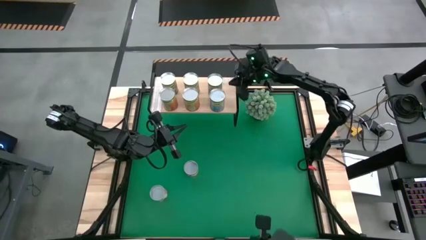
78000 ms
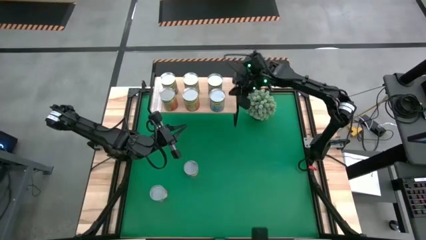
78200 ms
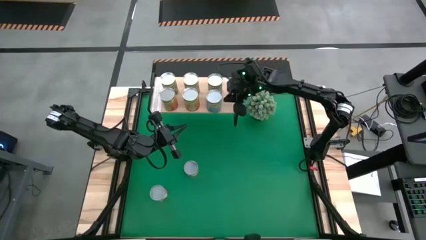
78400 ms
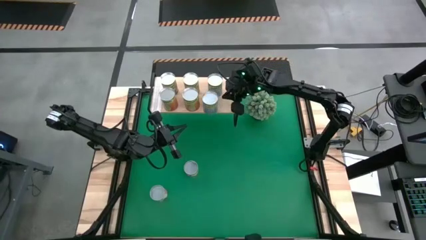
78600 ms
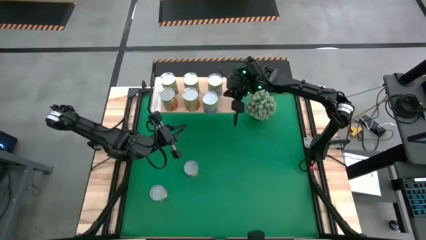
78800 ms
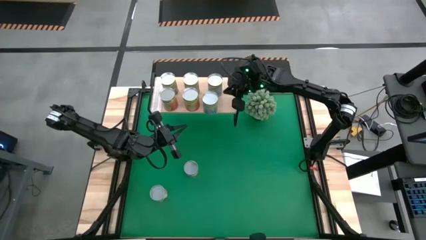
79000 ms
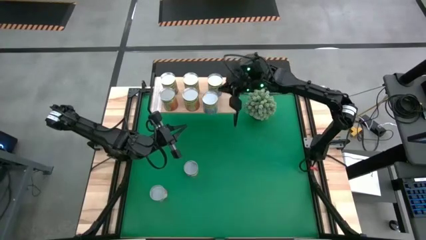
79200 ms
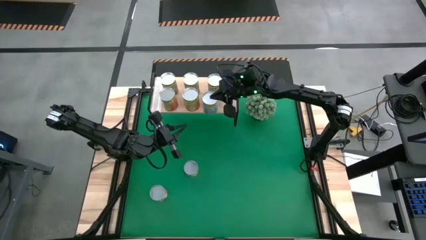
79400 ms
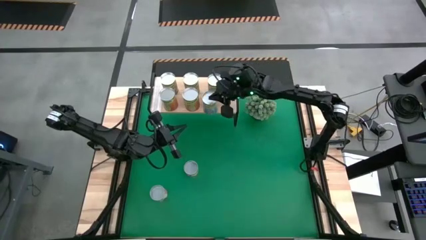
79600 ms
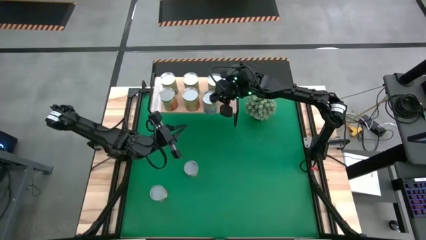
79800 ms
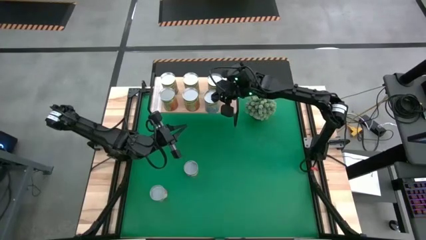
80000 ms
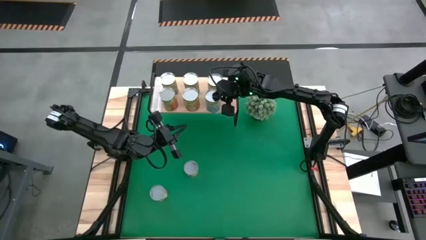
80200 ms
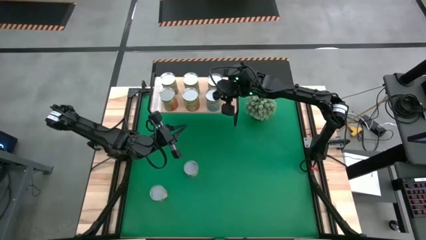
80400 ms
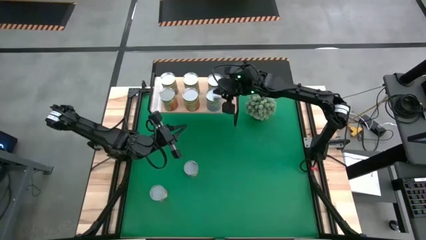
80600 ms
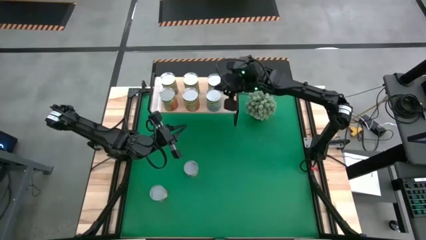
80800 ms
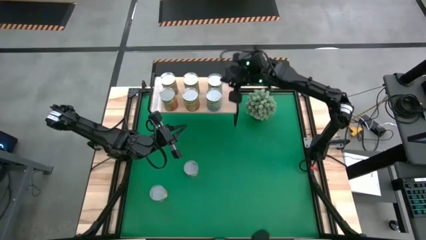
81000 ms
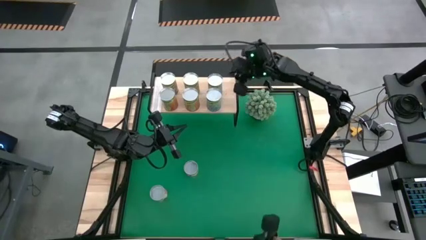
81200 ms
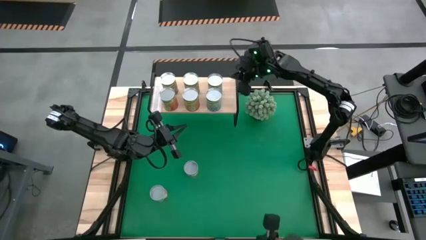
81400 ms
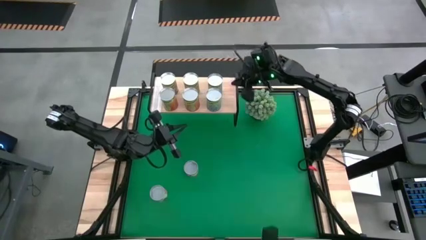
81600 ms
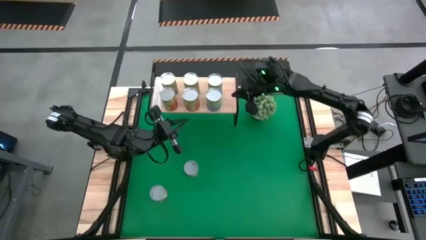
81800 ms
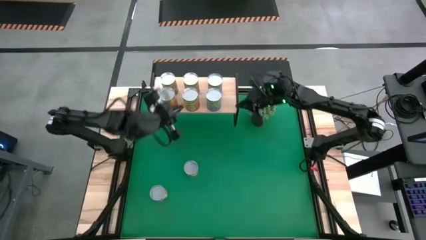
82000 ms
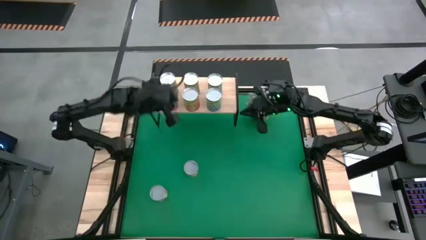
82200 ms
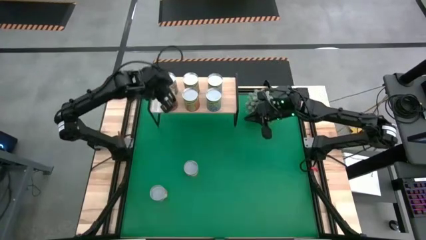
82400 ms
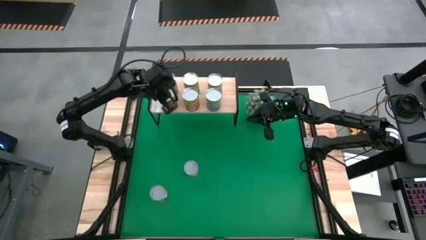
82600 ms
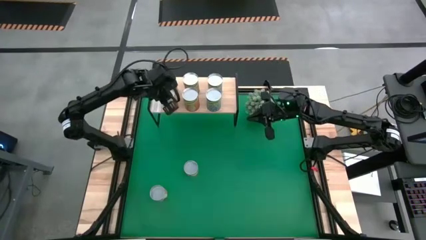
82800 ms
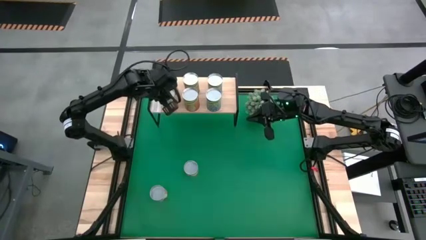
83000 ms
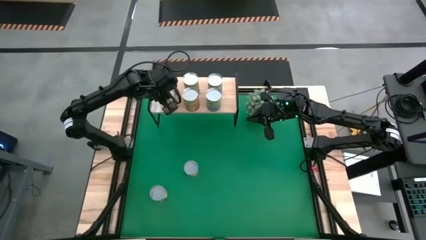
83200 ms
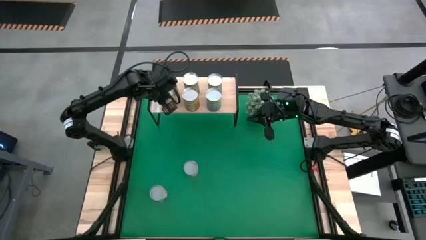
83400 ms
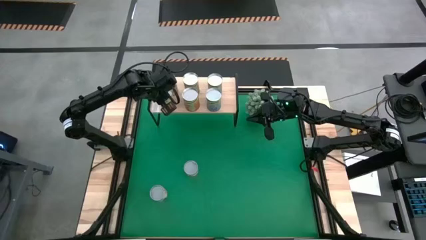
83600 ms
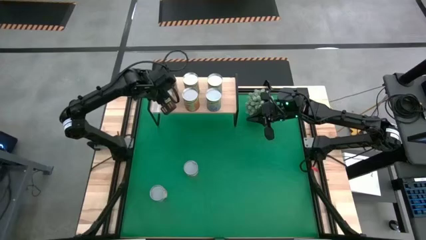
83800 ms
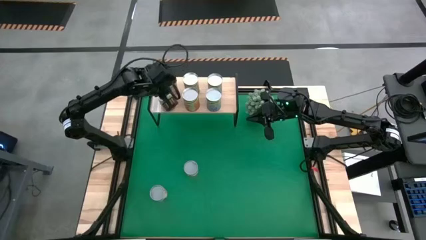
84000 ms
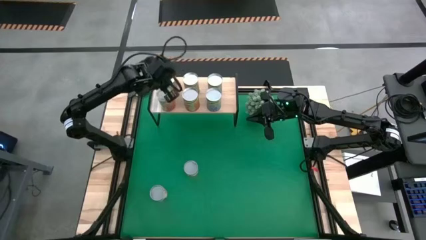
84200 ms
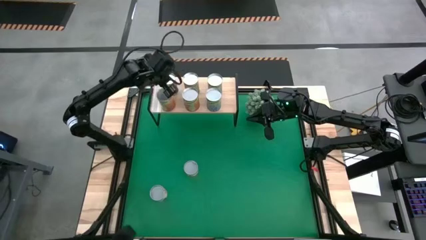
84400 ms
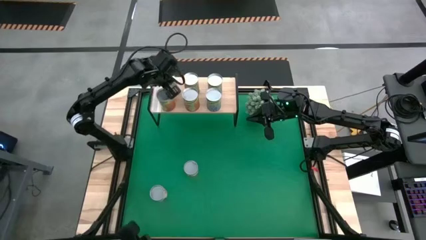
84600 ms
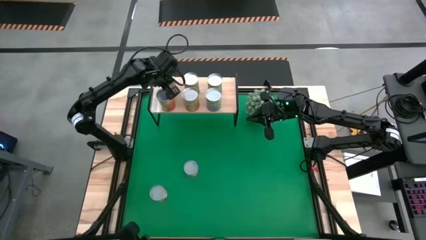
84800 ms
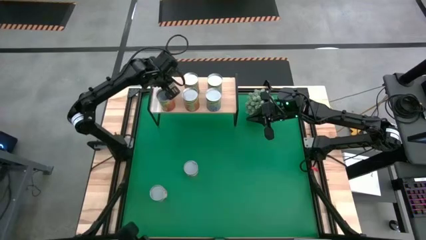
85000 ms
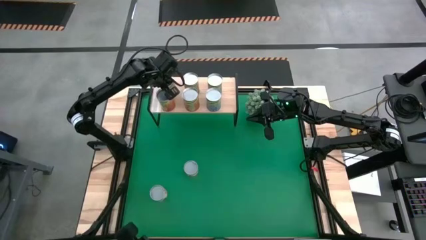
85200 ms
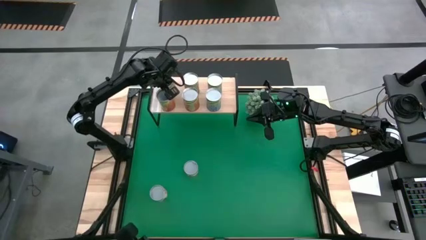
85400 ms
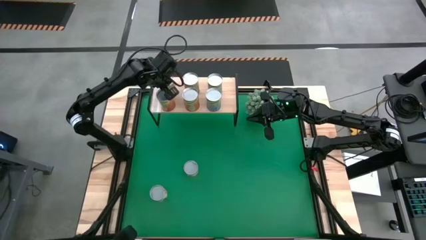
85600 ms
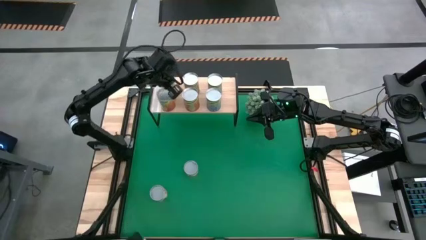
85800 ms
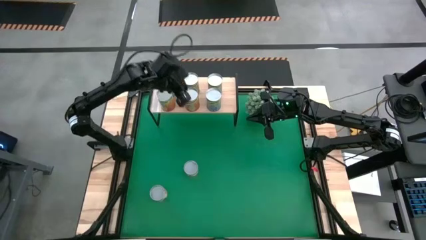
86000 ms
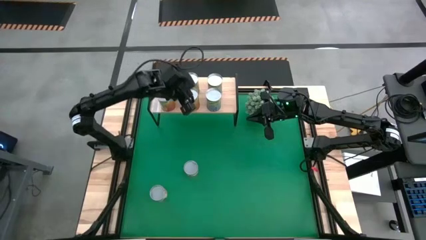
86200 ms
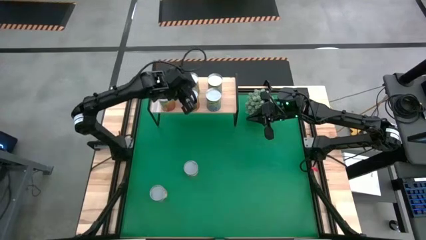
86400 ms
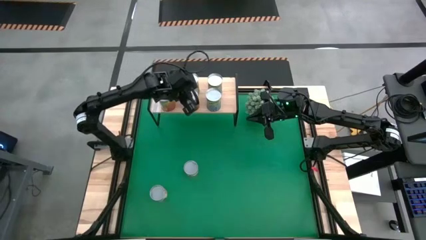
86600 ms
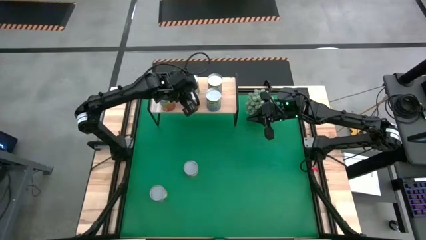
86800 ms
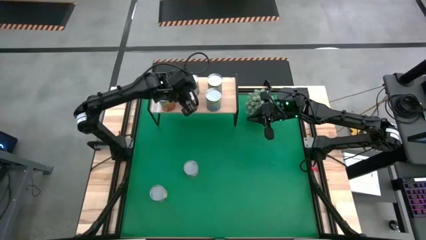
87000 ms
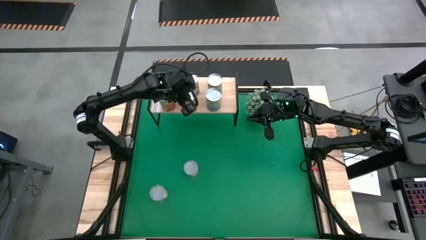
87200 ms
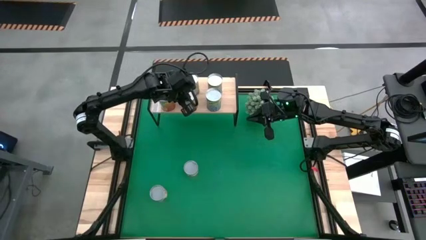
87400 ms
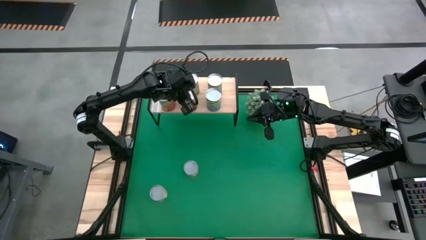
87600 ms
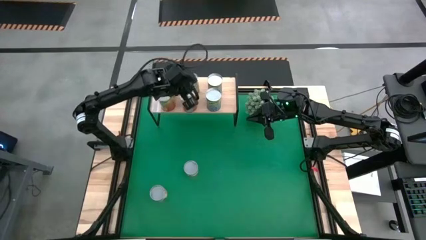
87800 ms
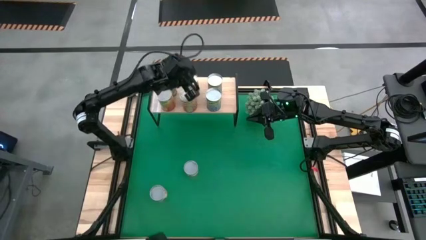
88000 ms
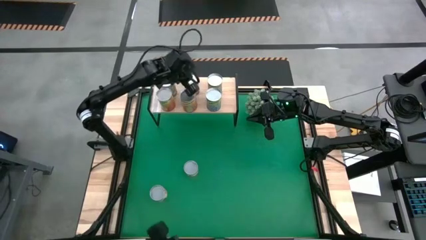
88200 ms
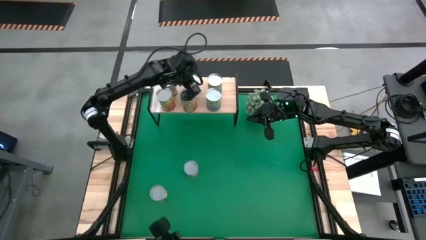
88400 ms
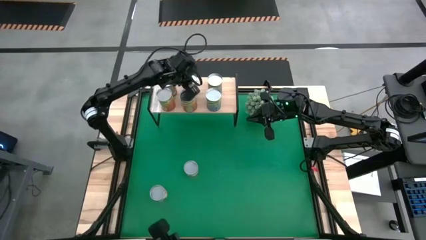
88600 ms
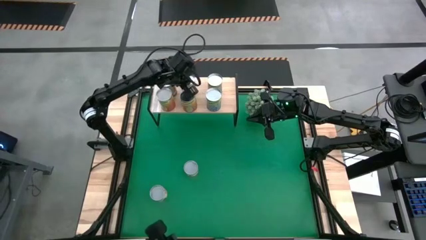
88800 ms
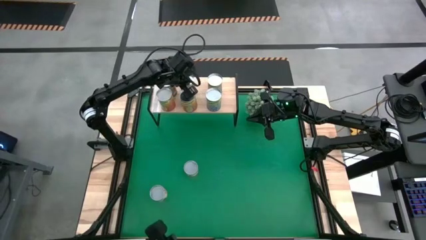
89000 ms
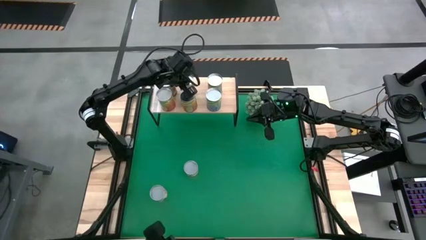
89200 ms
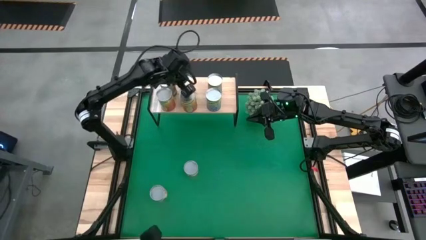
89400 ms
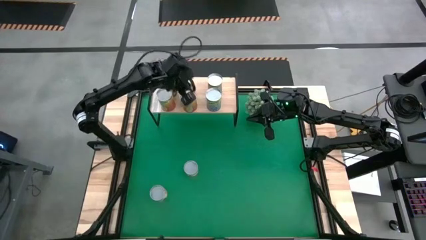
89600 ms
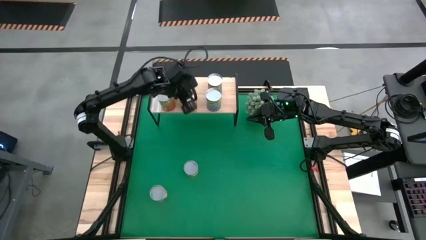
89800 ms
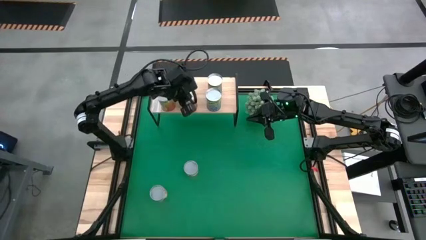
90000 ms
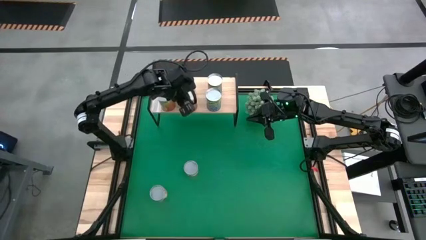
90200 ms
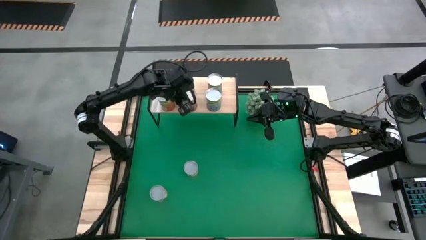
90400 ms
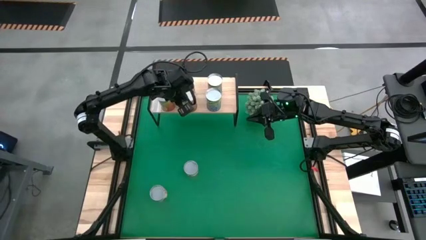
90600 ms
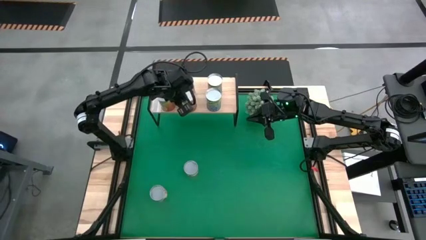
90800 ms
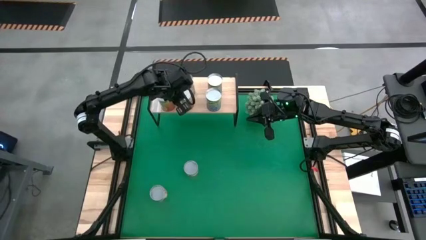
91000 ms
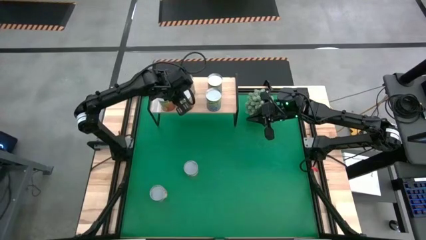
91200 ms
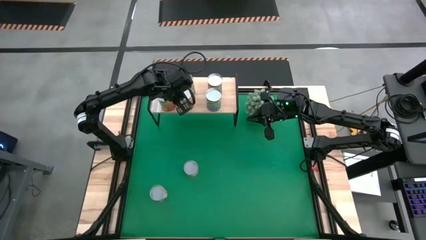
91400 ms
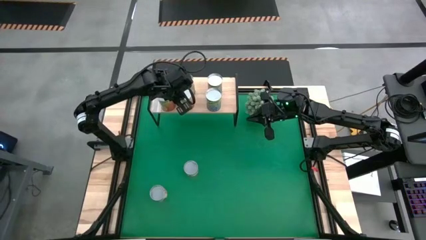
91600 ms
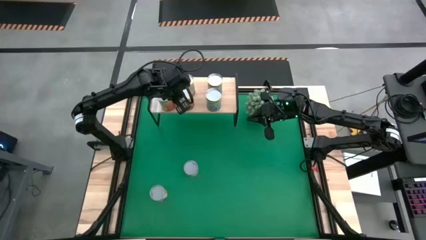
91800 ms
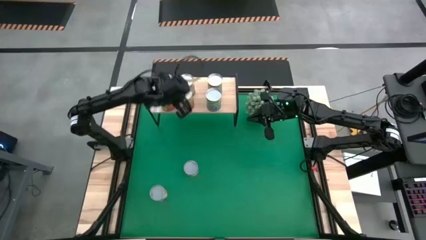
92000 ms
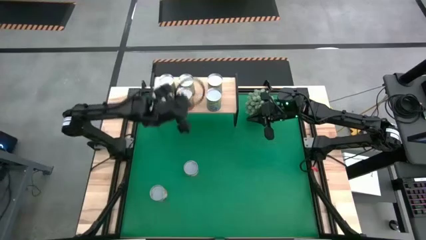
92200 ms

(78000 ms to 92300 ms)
Task: Pick and place cans onto a shelf
Adjust the canned goods on the shelf

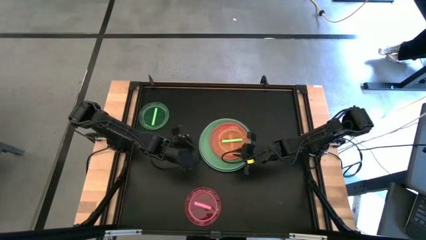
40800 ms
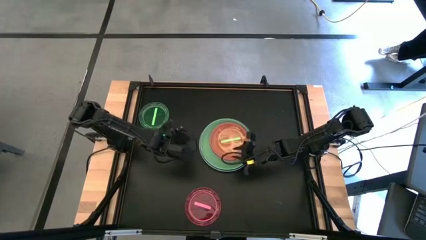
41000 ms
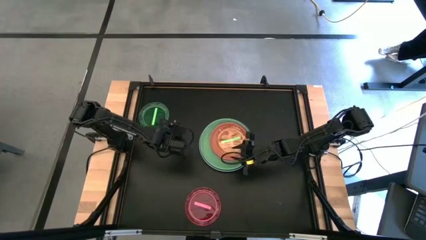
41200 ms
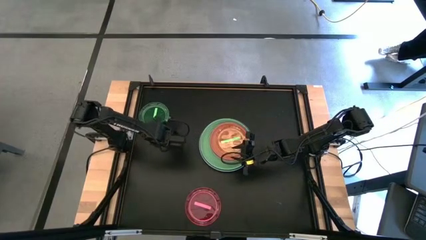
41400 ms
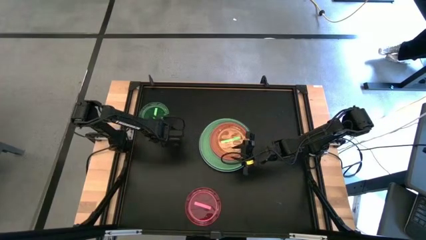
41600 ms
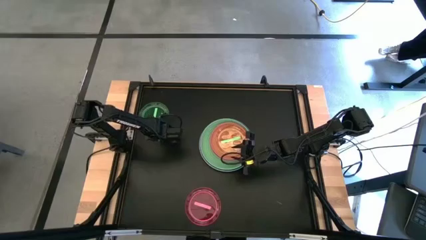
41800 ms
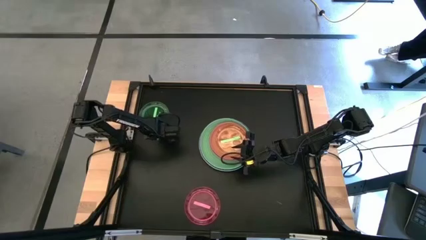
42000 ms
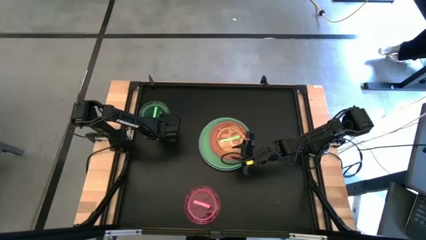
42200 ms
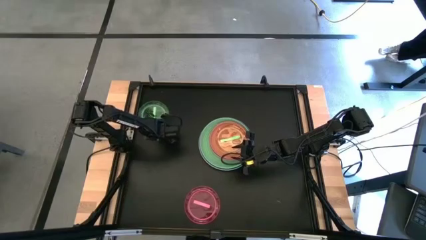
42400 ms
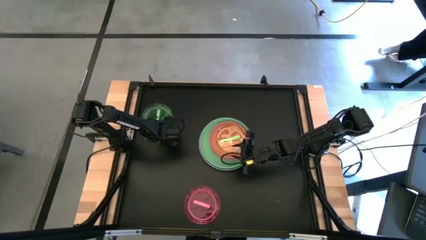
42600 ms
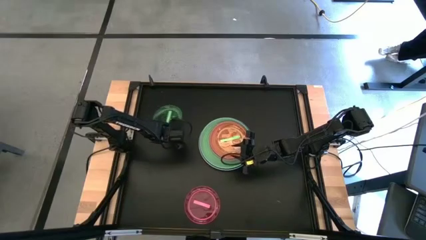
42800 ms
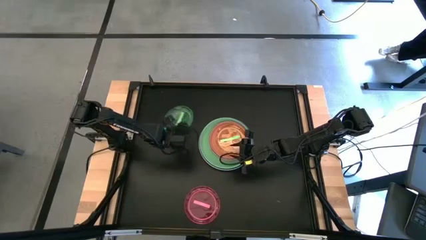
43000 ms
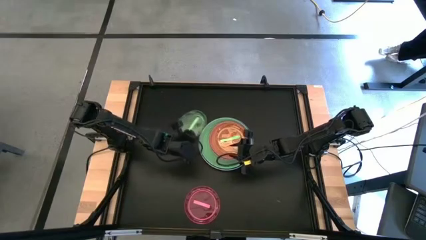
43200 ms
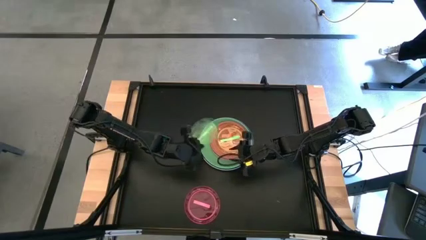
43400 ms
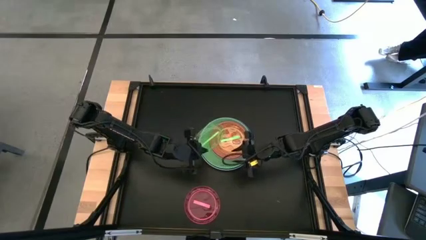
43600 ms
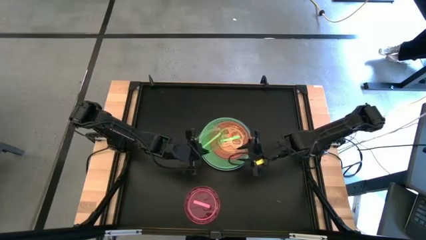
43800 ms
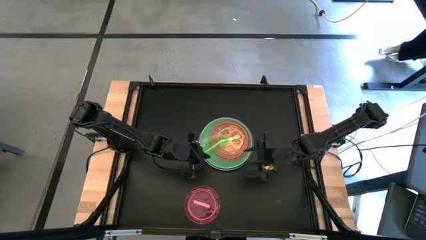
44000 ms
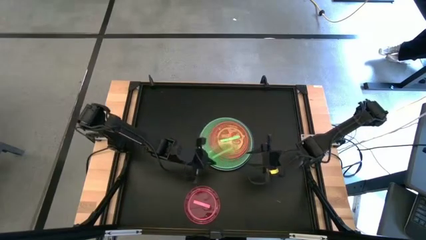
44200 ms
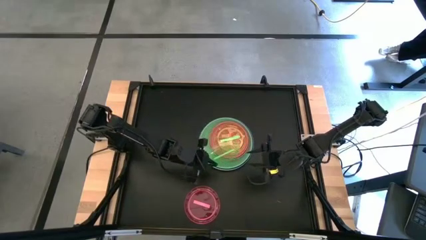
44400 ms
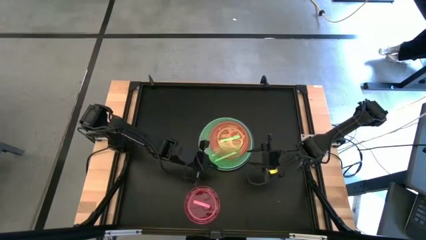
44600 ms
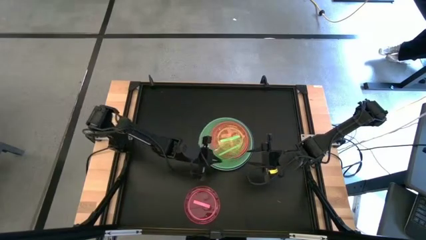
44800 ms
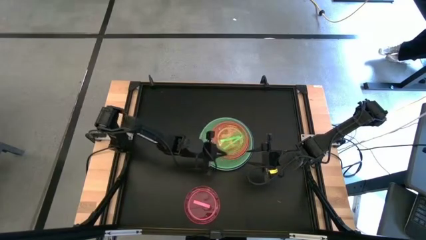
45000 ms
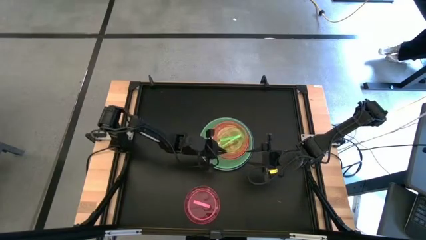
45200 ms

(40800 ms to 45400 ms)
Task: Stack plastic plates
Stack the small green plate on the small green plate
